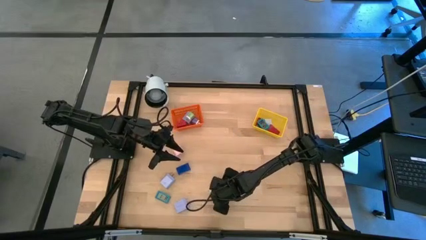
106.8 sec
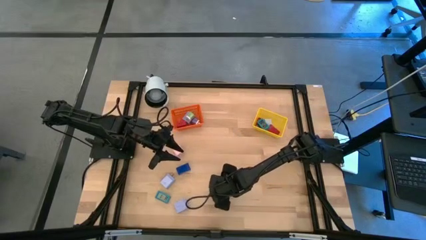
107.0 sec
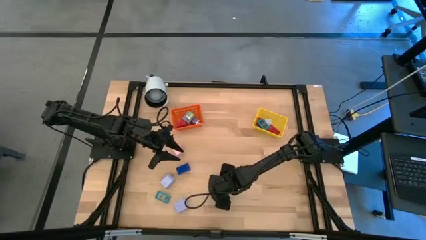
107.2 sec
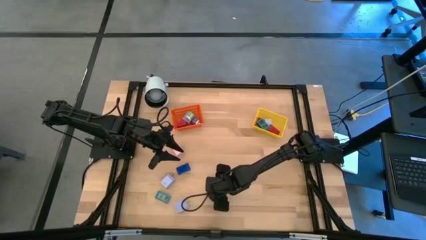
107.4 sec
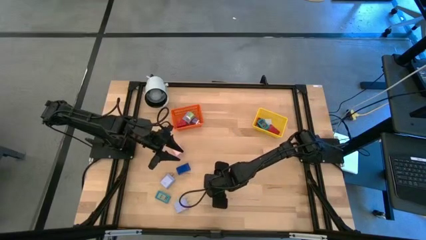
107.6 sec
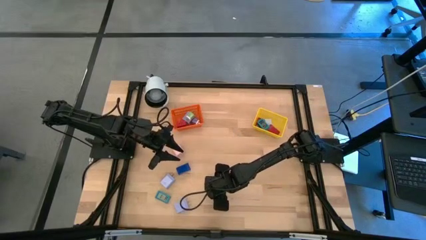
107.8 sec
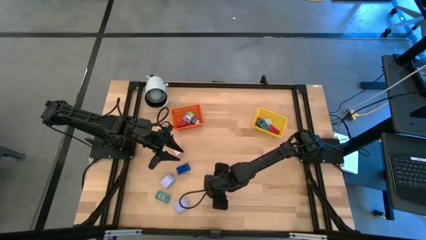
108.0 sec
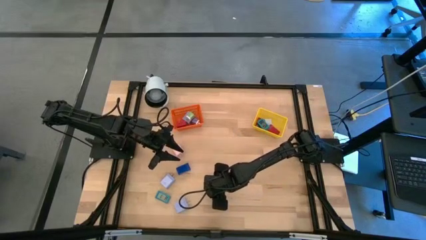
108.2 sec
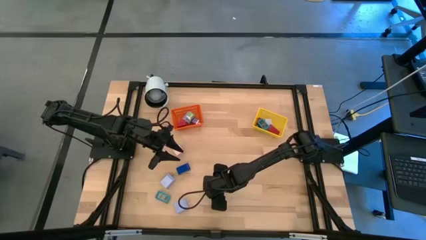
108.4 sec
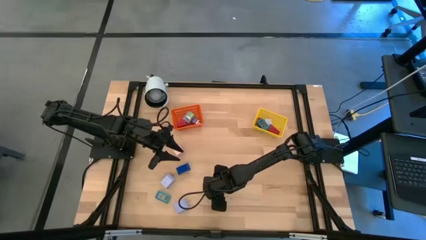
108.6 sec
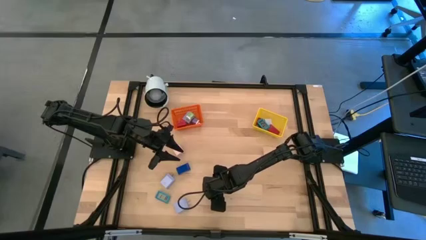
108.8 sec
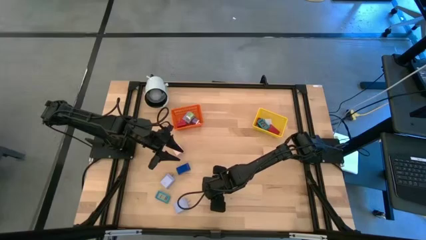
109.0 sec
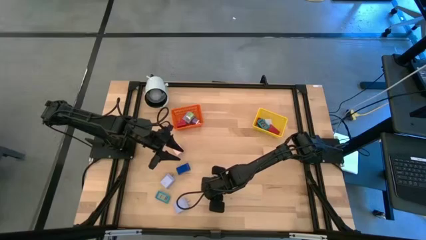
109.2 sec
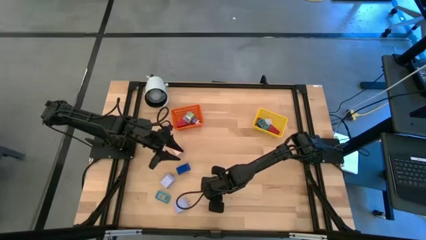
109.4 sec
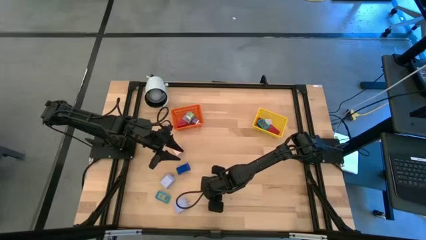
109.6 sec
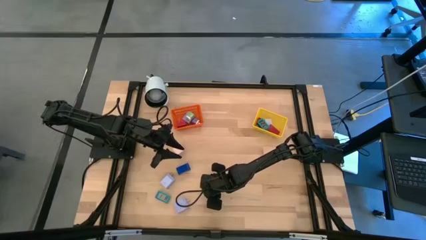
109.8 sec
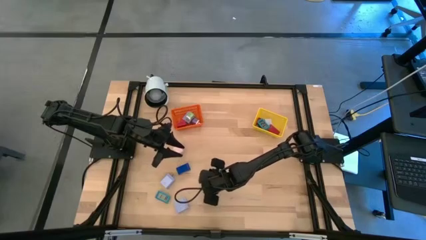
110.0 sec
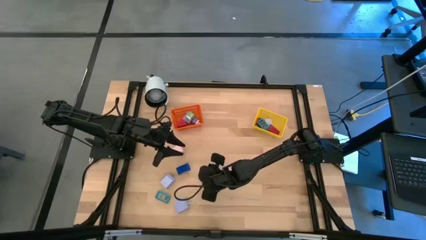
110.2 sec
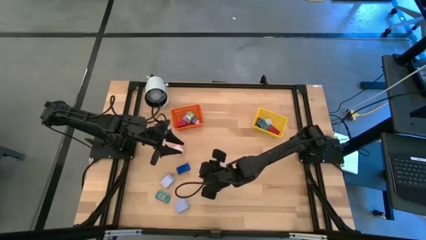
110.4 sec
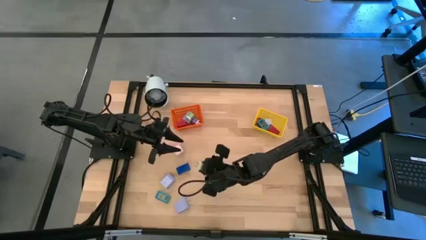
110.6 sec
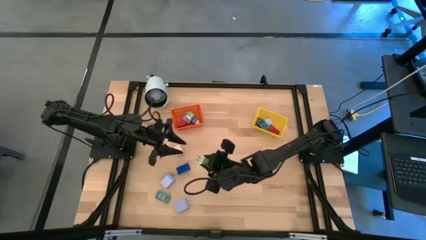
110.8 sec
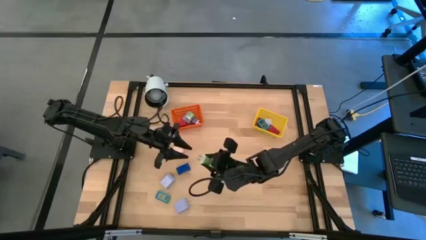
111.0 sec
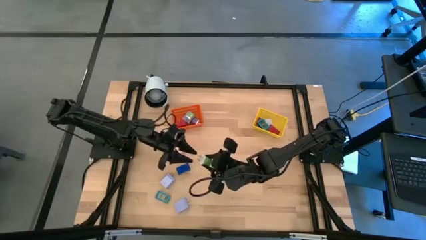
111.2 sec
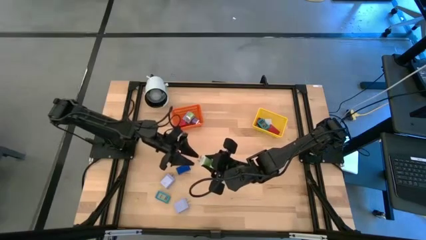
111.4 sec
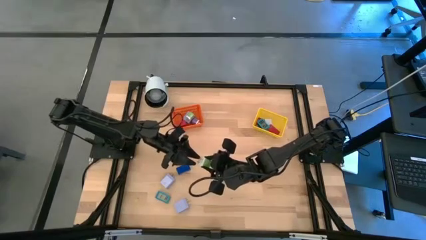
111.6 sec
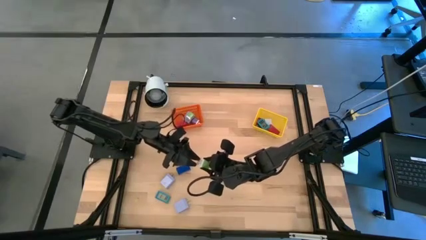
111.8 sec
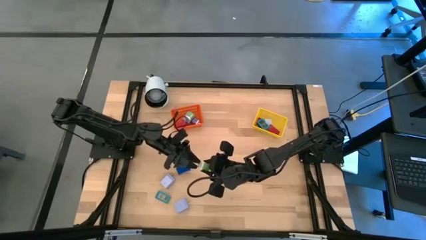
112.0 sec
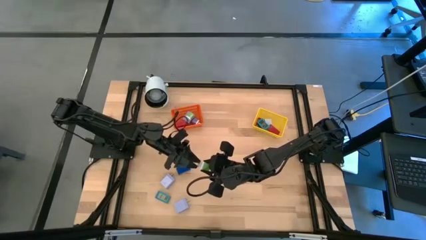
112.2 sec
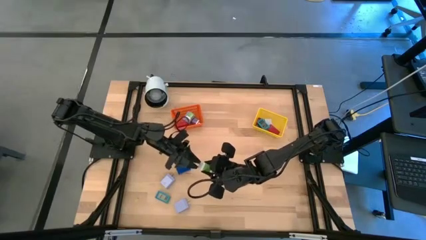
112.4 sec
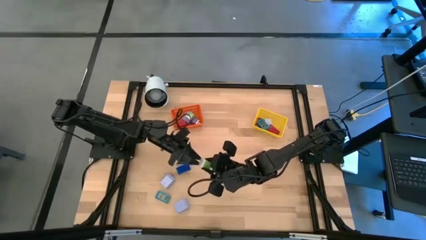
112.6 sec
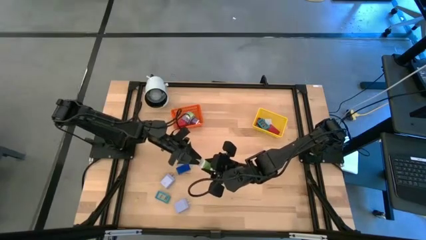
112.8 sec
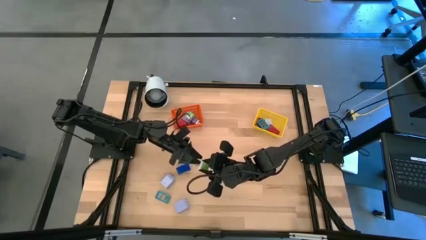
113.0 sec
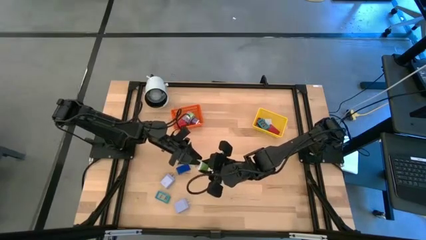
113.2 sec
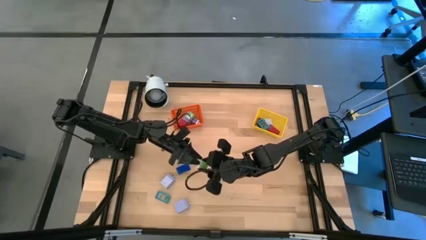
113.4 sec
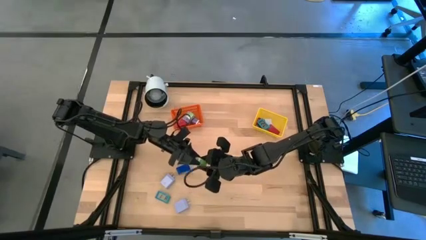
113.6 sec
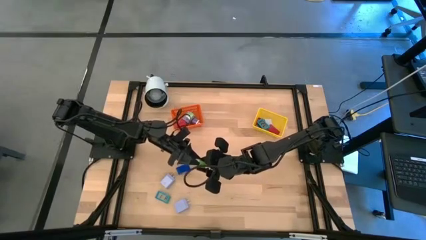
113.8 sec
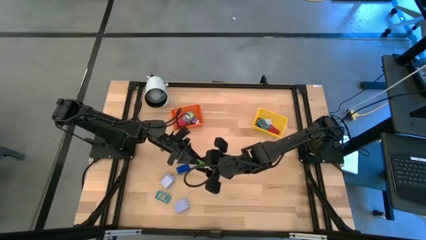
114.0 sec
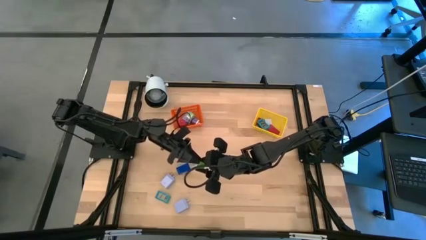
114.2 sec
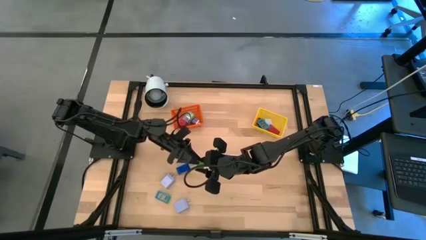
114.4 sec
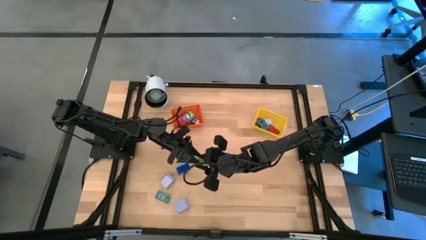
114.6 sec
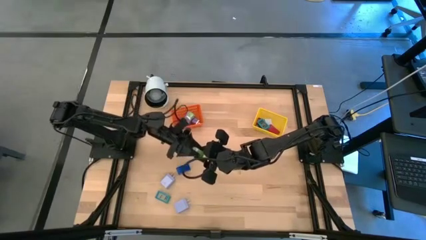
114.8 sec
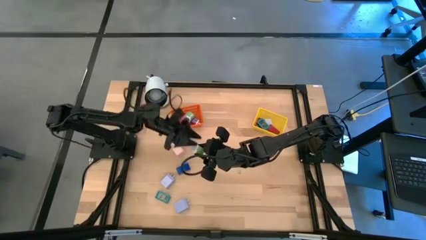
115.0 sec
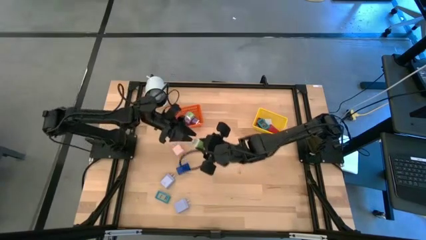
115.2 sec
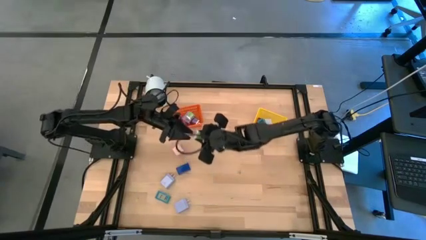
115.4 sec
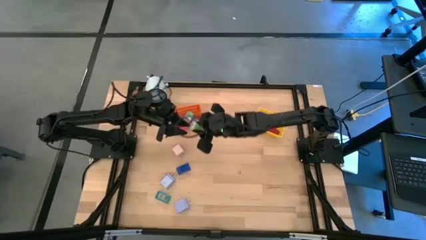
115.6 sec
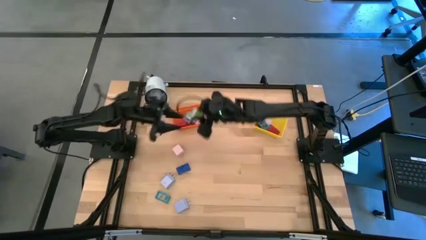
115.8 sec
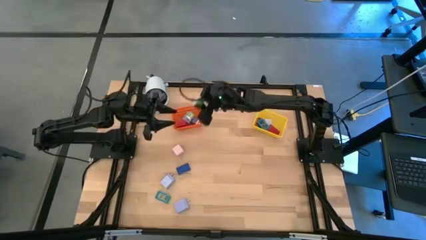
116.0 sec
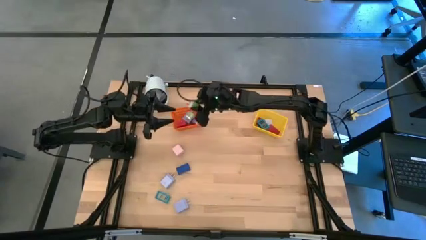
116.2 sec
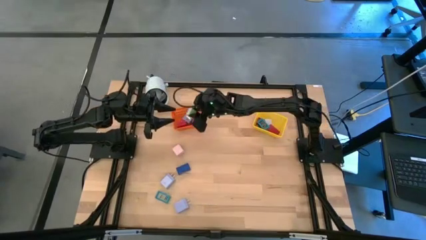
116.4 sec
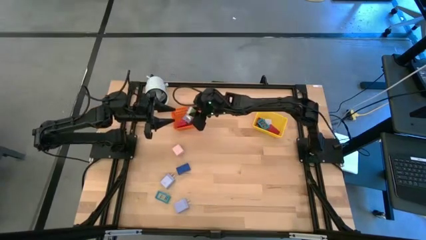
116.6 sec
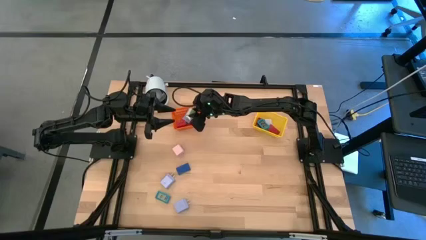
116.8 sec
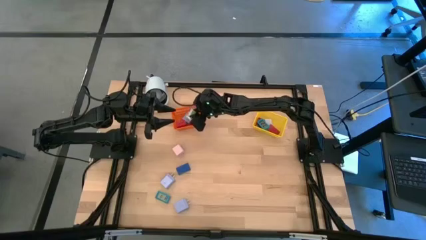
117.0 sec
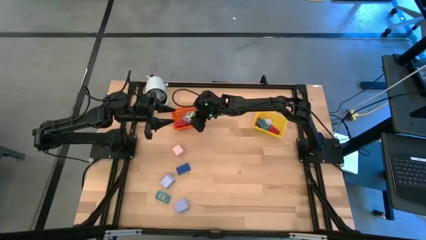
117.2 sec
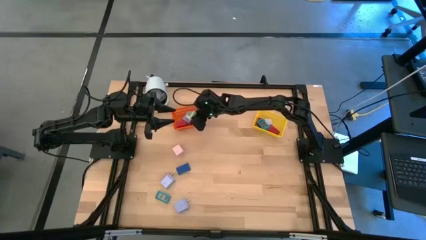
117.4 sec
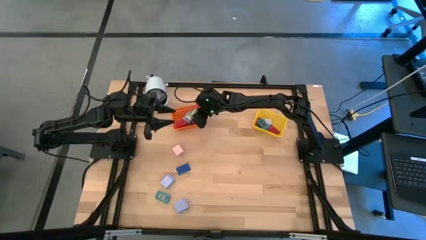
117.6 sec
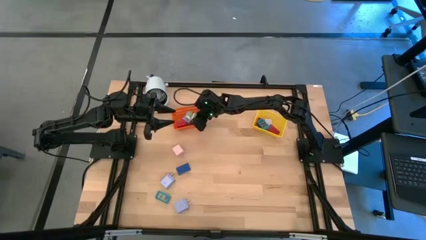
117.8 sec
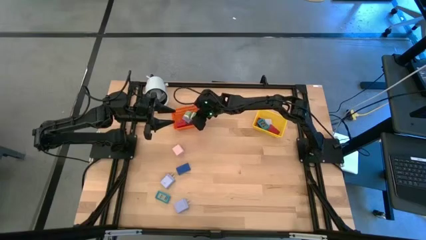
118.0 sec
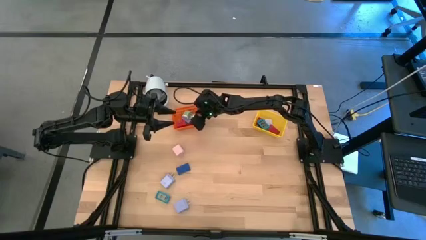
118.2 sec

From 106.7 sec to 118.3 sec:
Task: Pick & Place Office items
Put the green charger adapter into the orange bin
